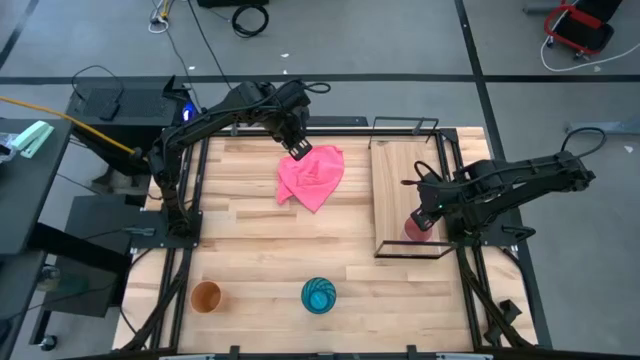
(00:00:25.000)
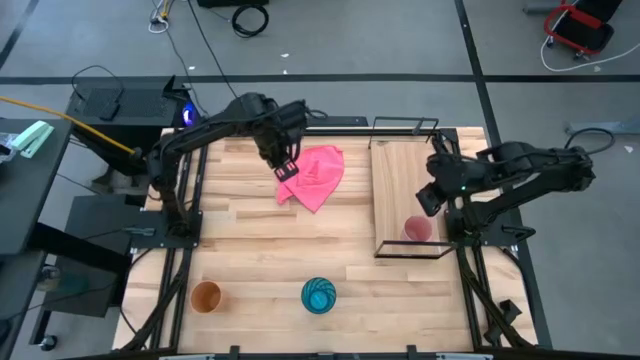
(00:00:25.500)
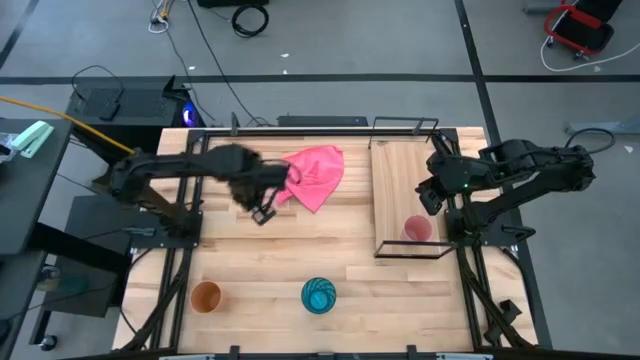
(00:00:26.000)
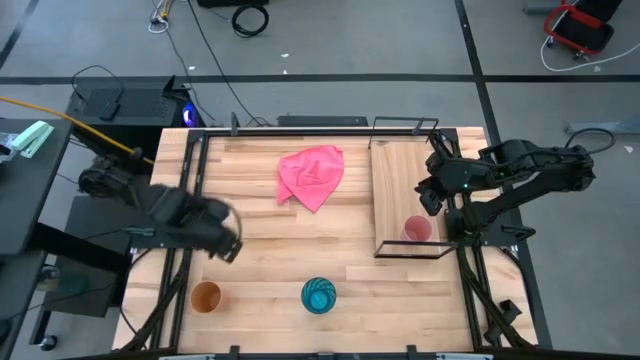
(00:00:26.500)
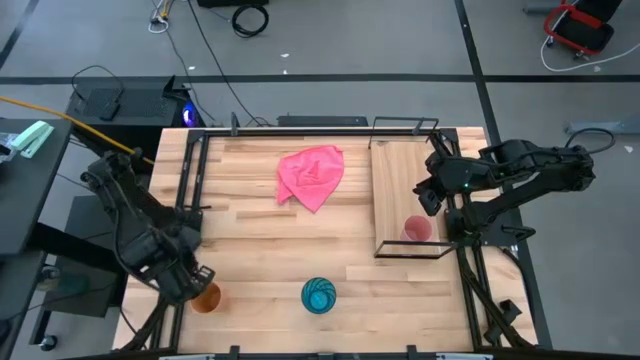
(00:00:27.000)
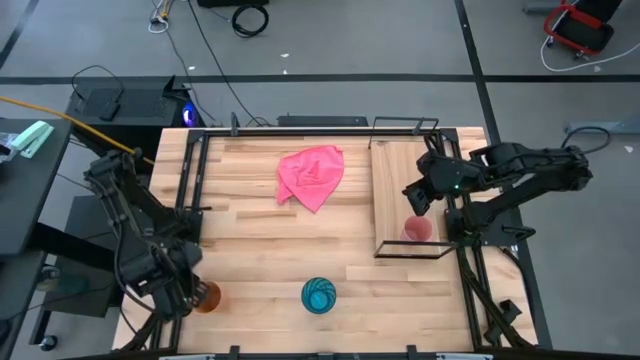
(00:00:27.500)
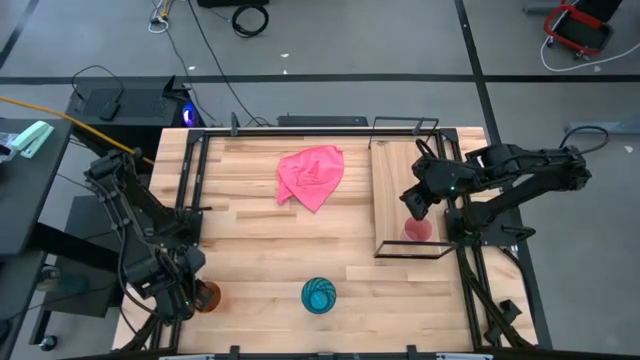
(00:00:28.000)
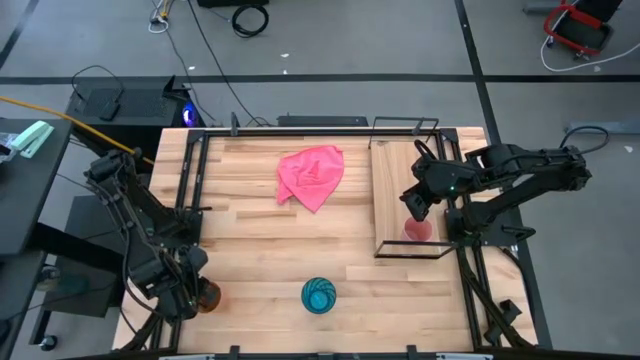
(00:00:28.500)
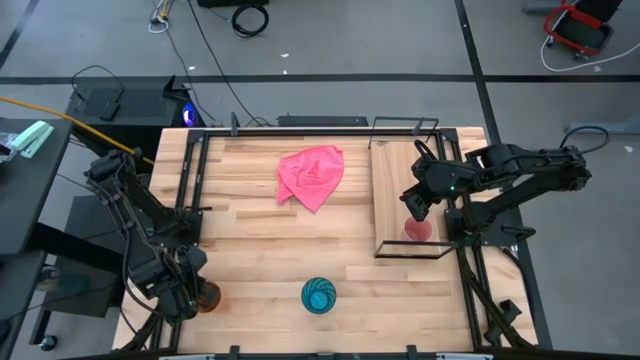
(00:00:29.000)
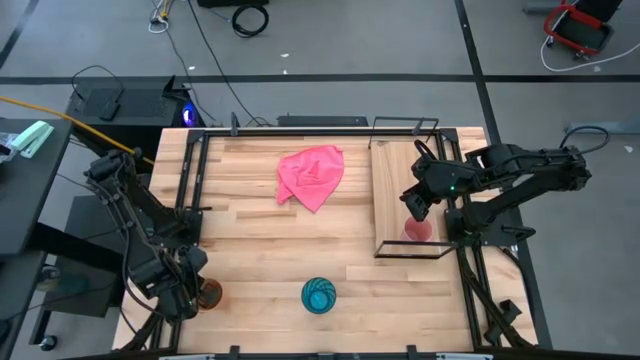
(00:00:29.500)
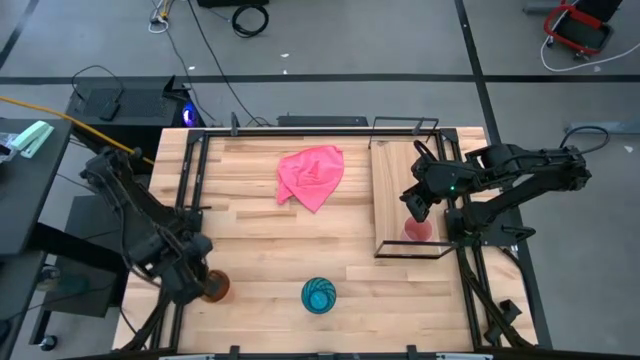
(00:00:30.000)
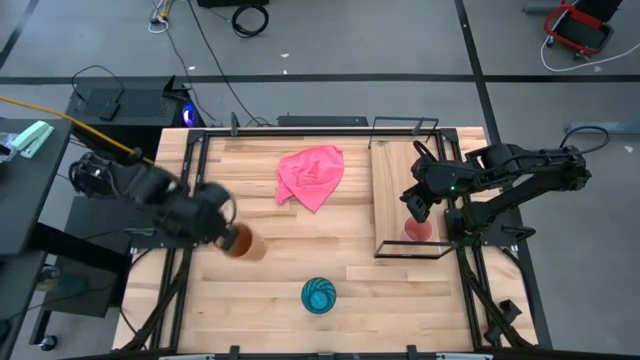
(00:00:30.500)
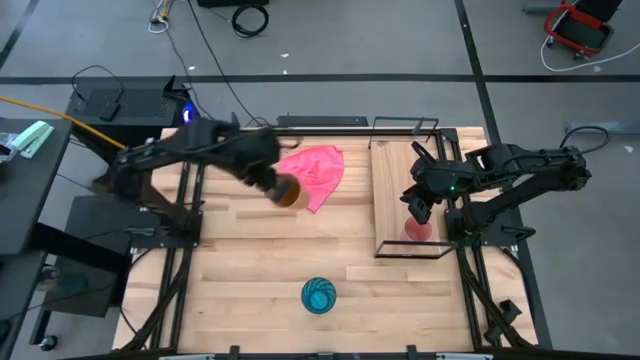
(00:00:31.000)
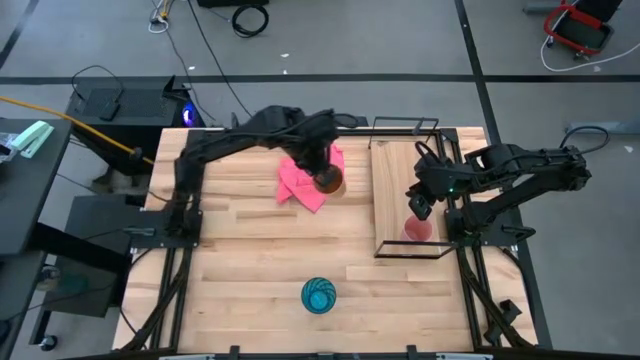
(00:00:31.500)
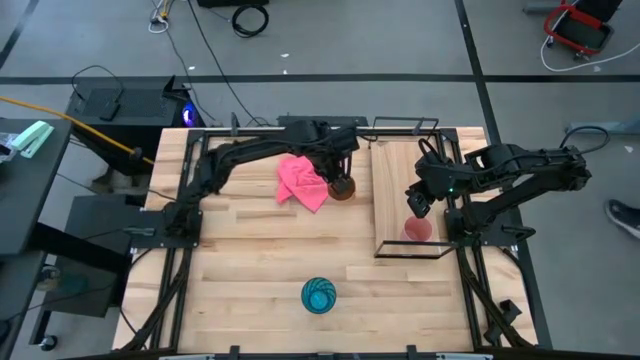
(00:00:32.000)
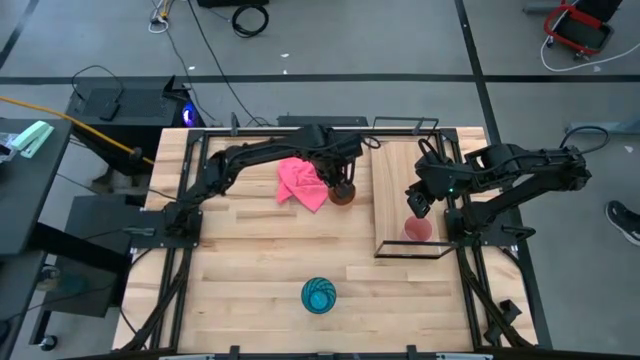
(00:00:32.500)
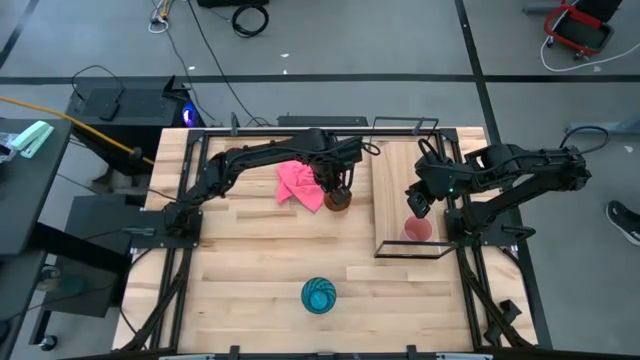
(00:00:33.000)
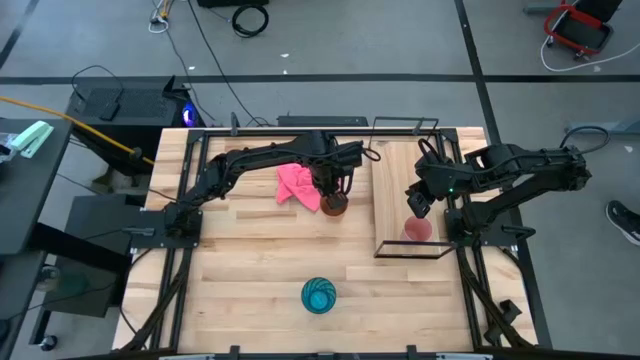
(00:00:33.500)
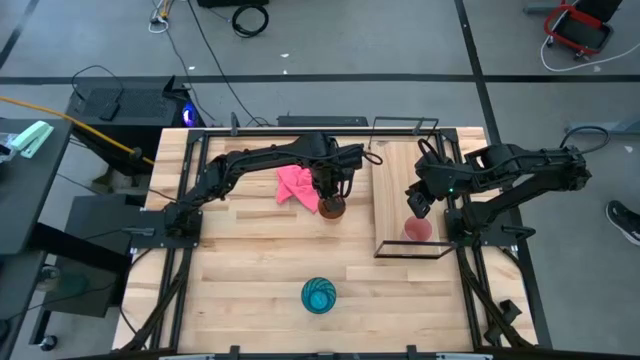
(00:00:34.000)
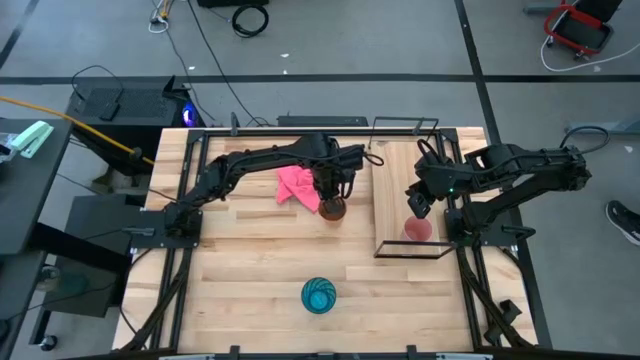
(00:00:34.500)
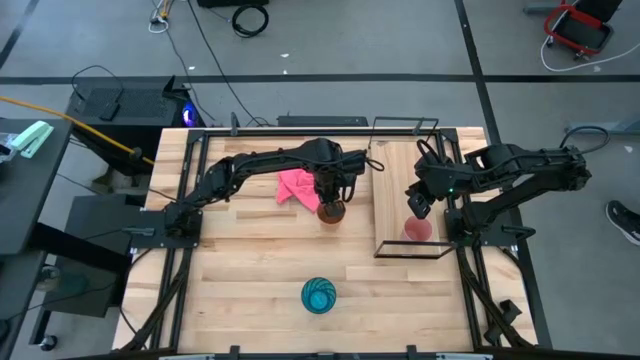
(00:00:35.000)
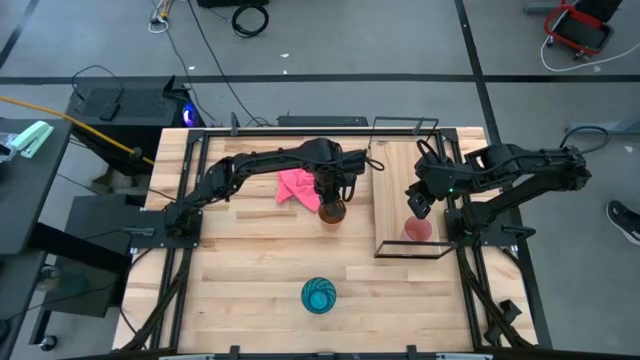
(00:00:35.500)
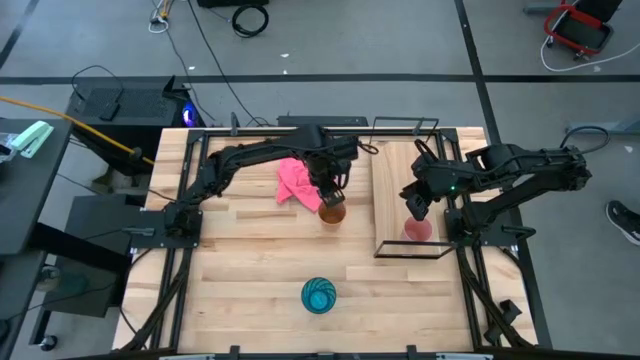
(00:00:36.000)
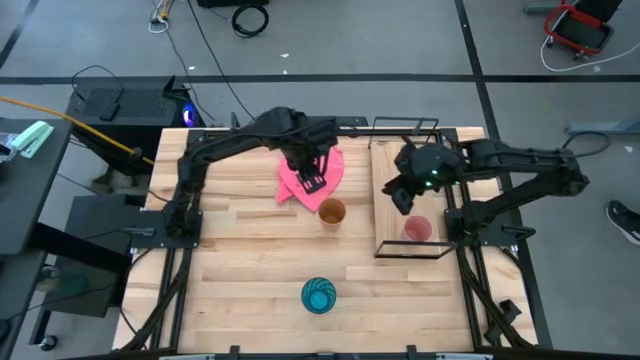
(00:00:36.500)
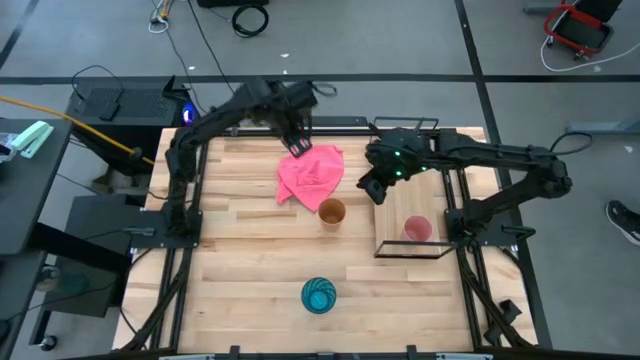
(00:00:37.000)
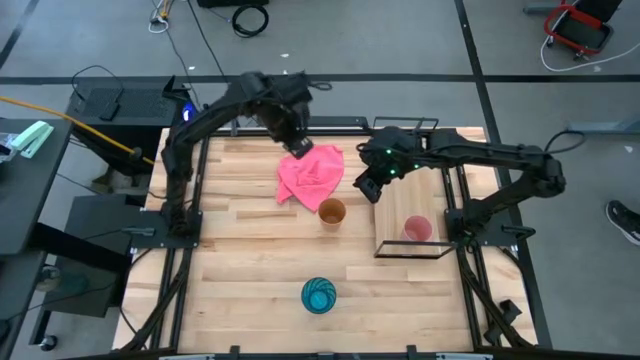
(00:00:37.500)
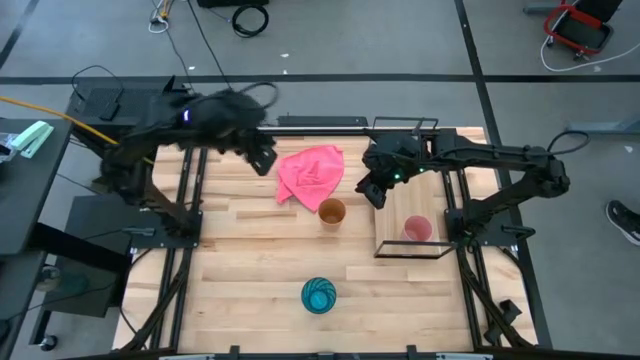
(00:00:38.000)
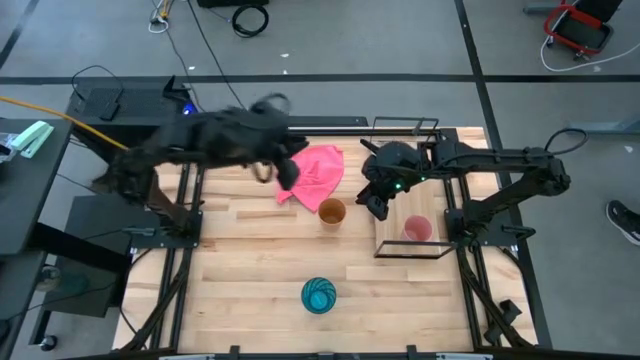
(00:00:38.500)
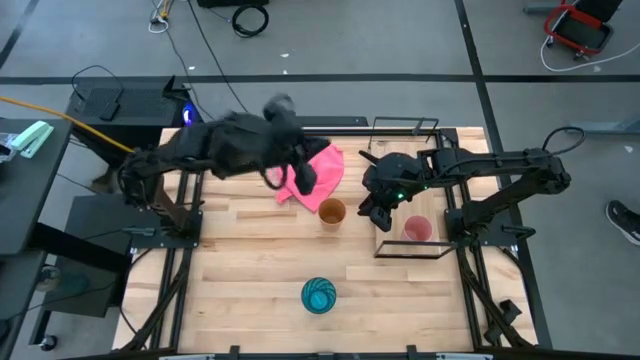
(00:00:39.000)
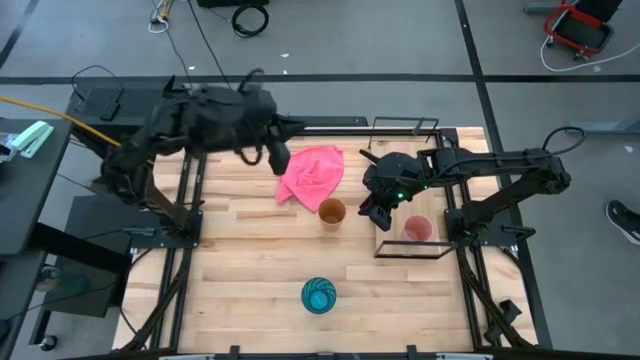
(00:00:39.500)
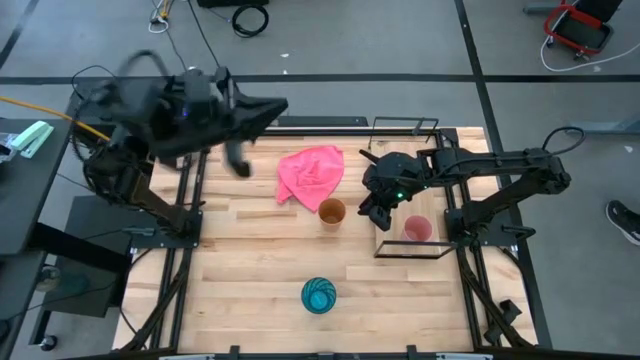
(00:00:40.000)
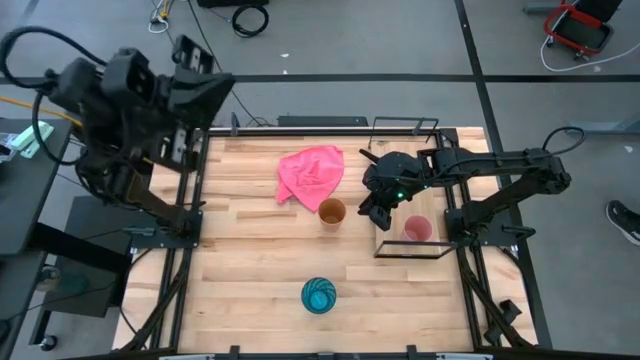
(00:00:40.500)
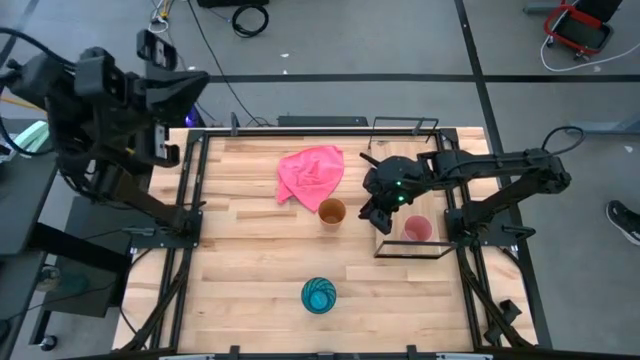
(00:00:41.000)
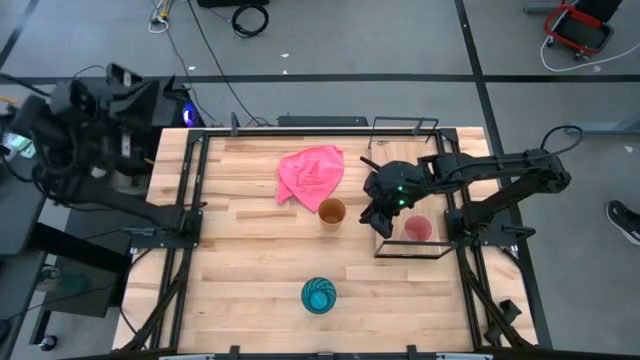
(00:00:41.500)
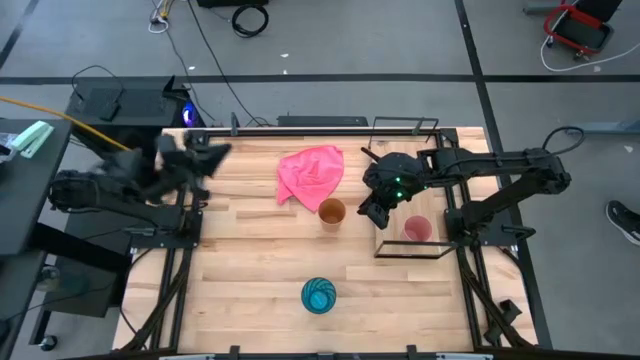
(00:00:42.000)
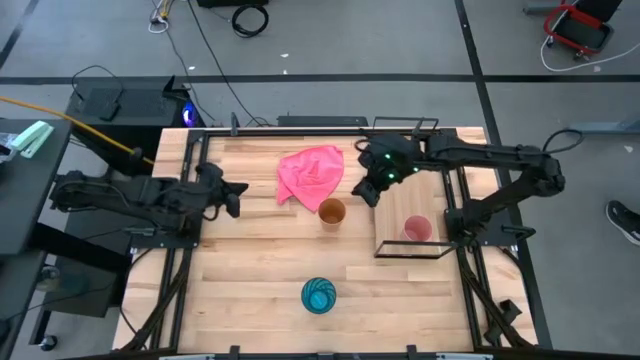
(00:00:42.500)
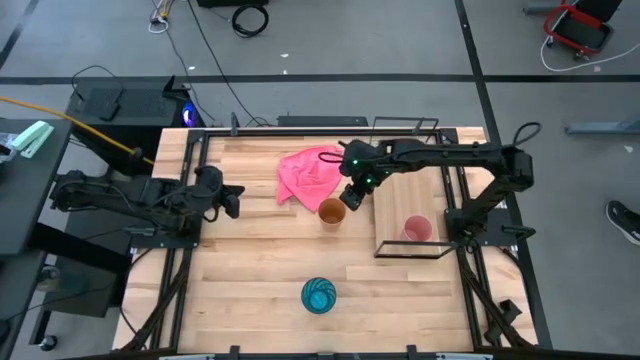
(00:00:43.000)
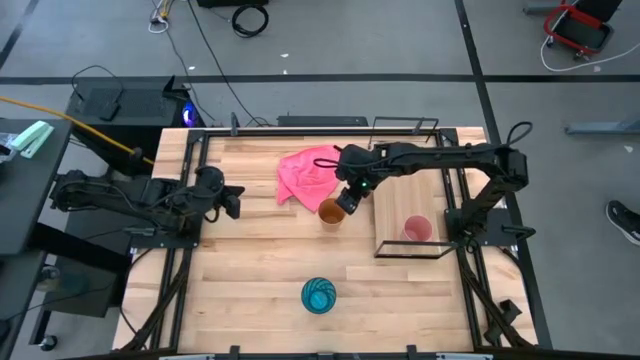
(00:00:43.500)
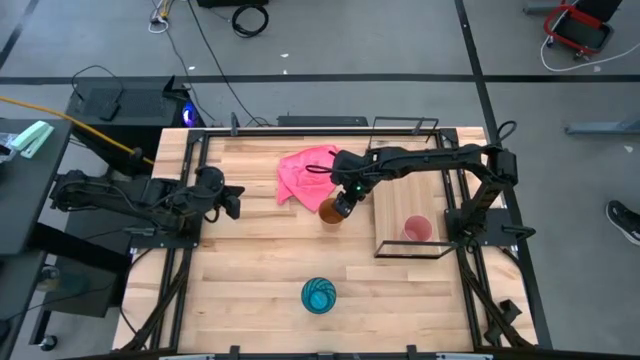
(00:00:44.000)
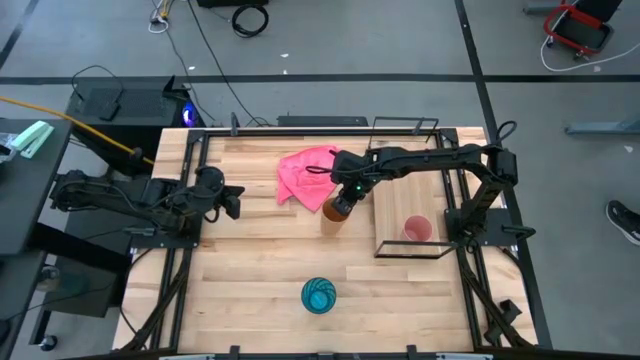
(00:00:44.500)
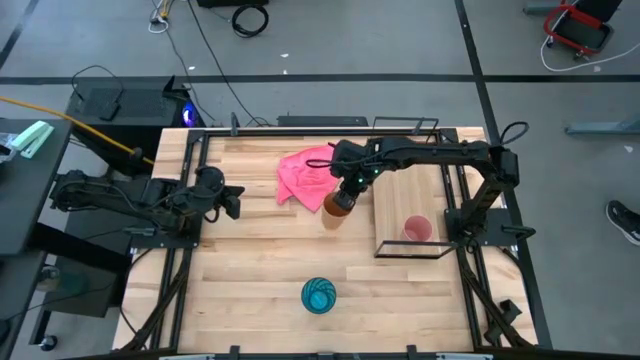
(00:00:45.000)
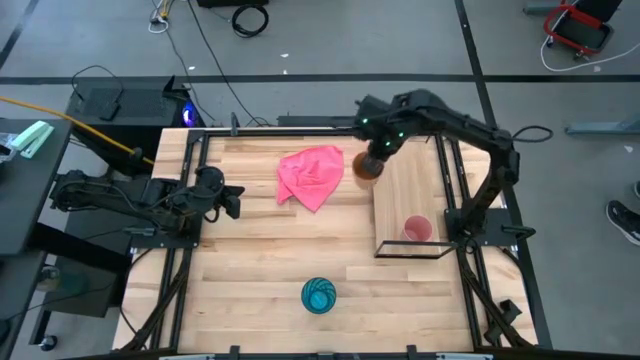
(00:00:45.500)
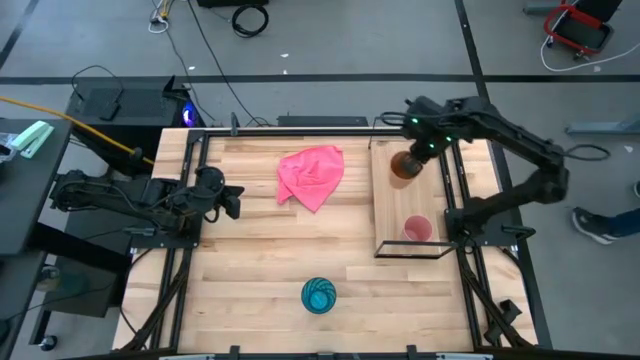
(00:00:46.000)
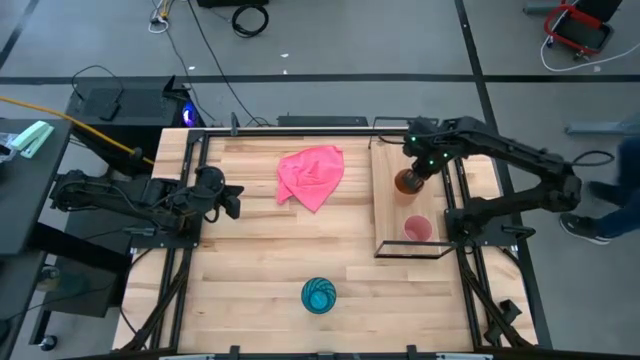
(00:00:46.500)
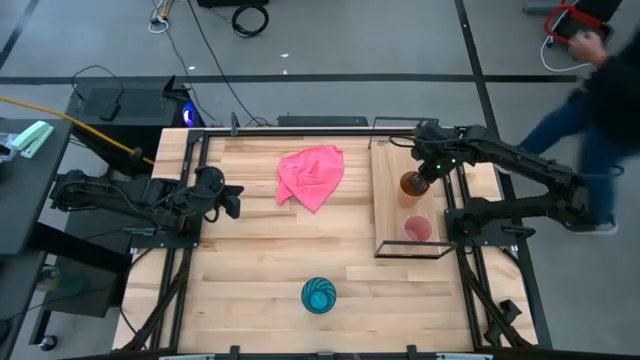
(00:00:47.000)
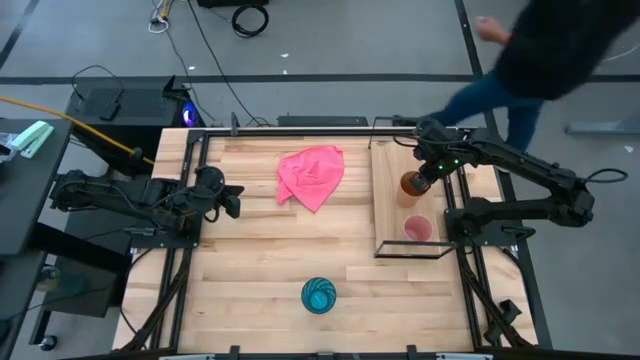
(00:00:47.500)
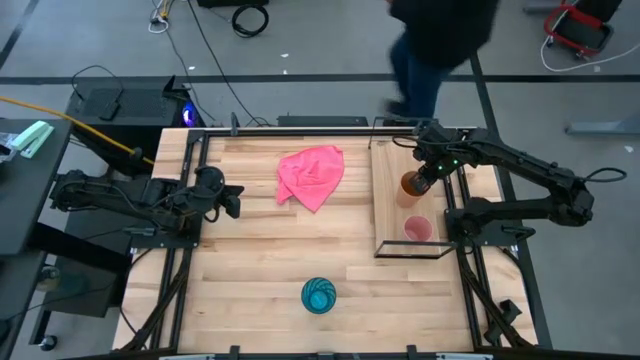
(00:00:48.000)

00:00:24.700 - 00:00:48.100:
Task: Stack small to large cups/mugs on shelf
Put the brown plastic cup on the shelf
